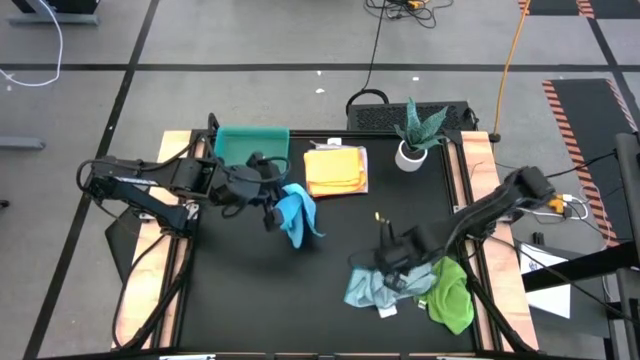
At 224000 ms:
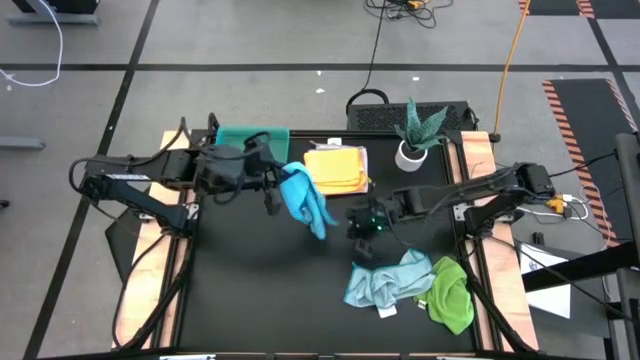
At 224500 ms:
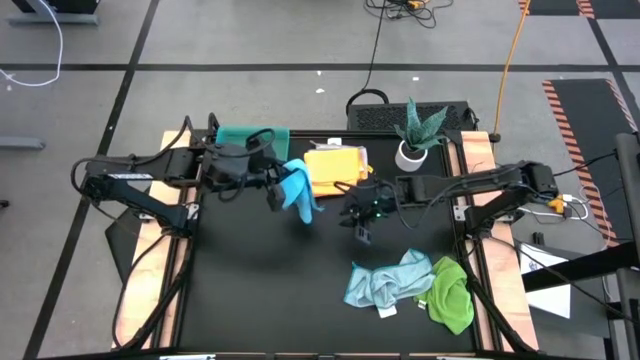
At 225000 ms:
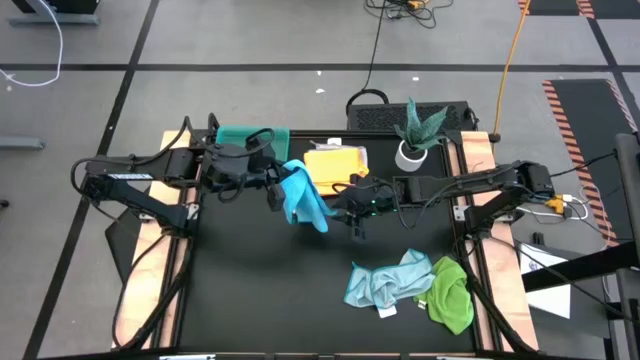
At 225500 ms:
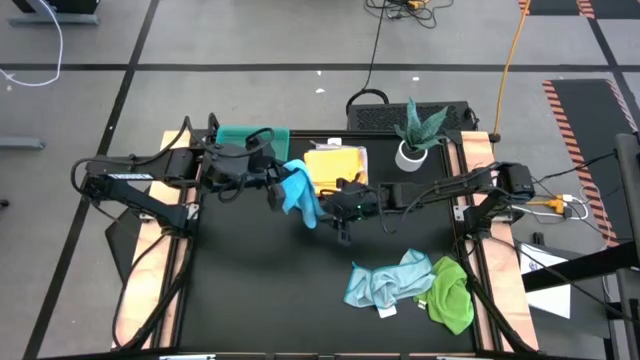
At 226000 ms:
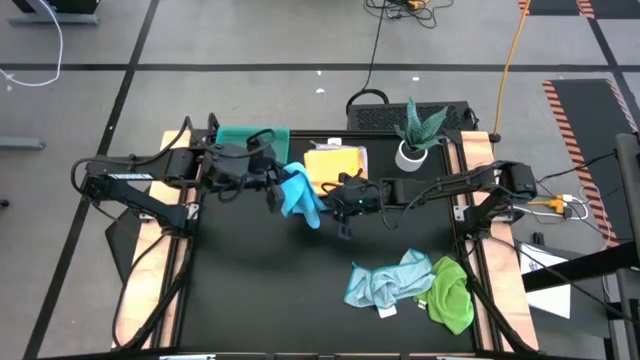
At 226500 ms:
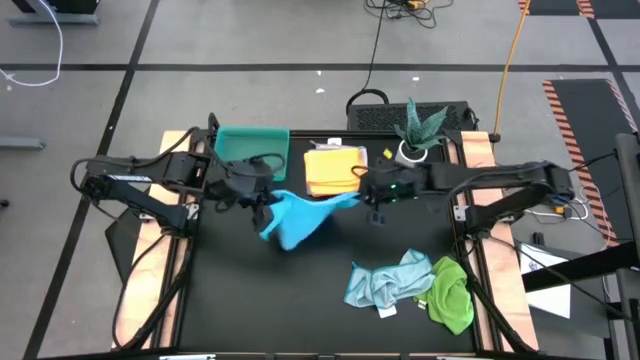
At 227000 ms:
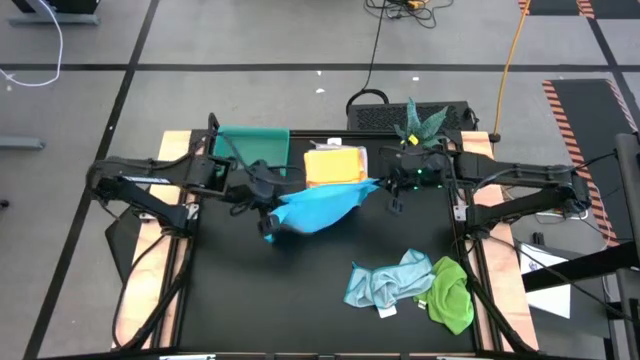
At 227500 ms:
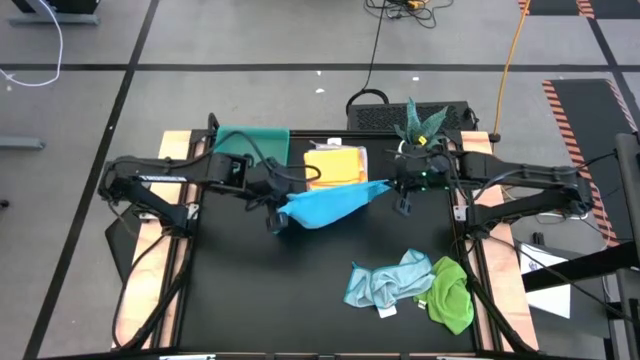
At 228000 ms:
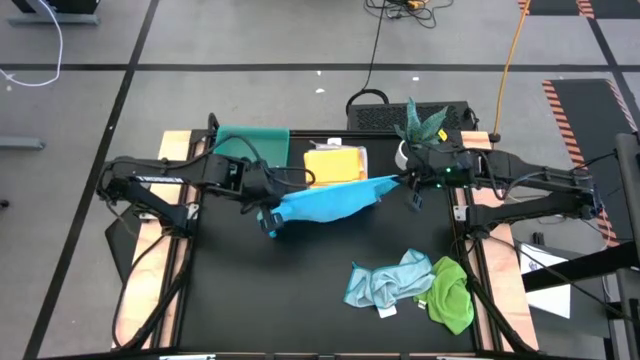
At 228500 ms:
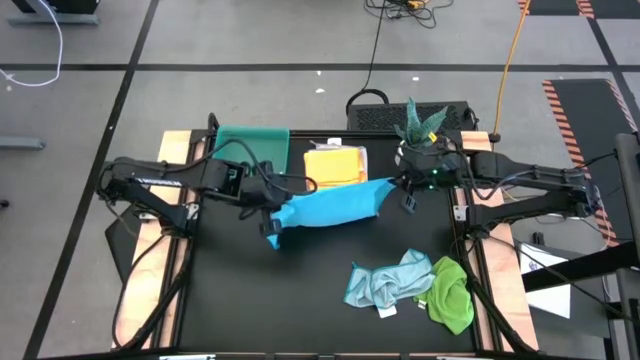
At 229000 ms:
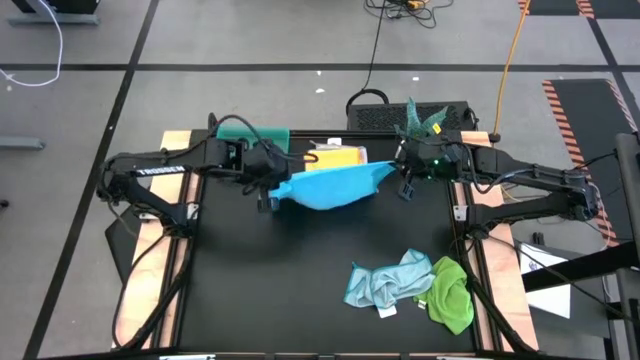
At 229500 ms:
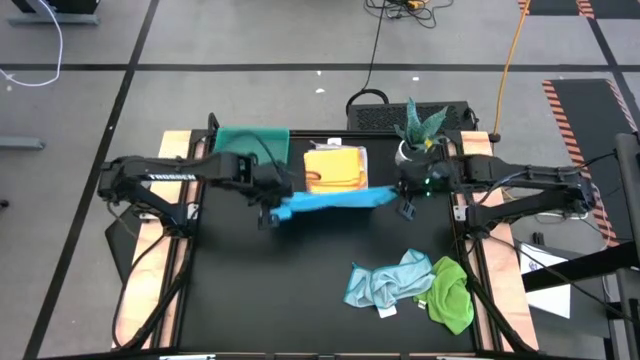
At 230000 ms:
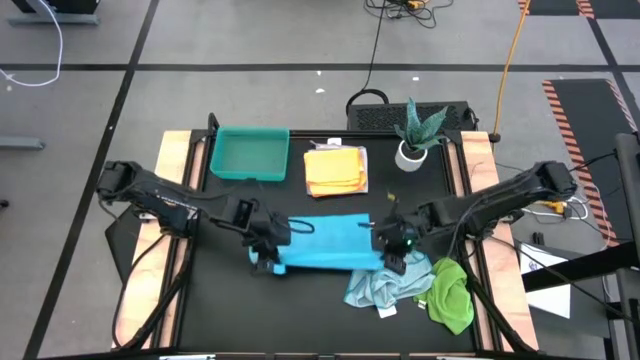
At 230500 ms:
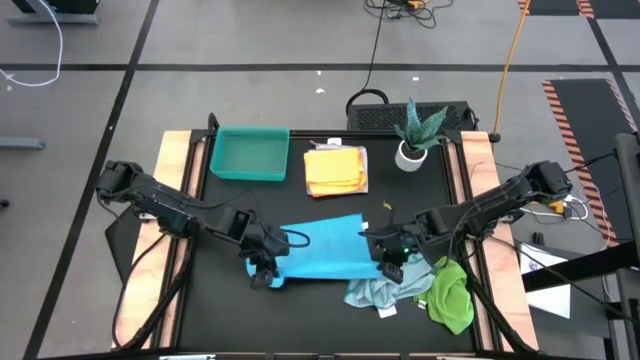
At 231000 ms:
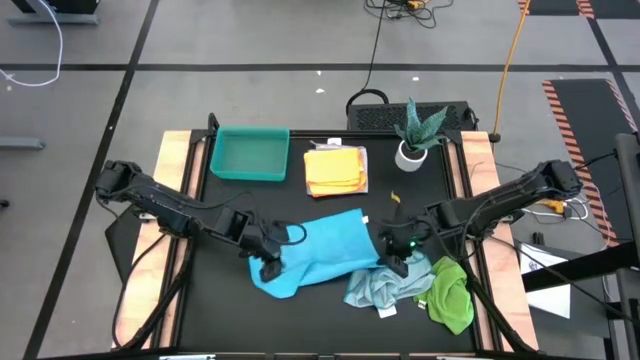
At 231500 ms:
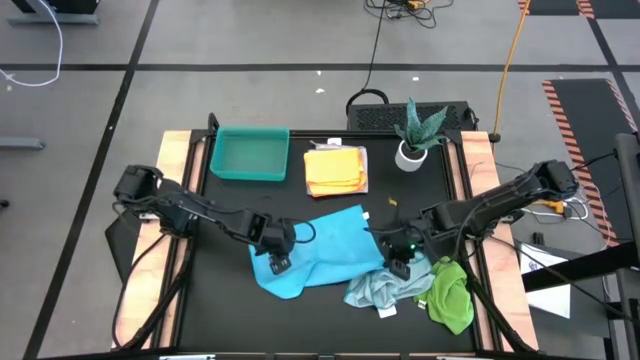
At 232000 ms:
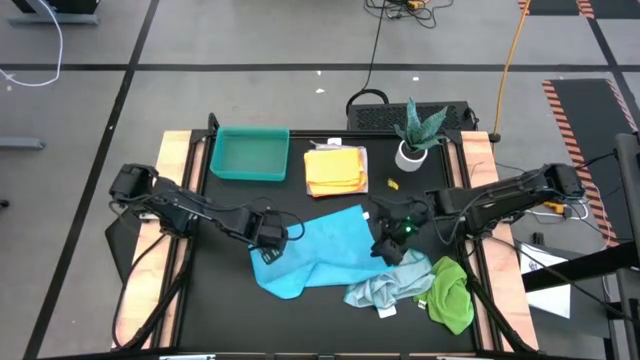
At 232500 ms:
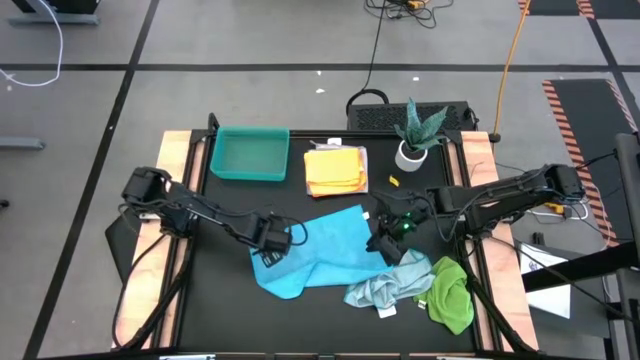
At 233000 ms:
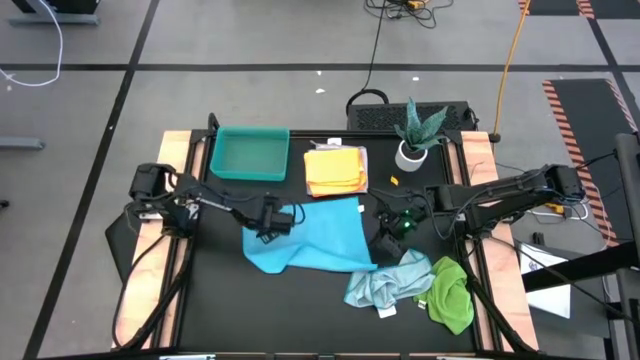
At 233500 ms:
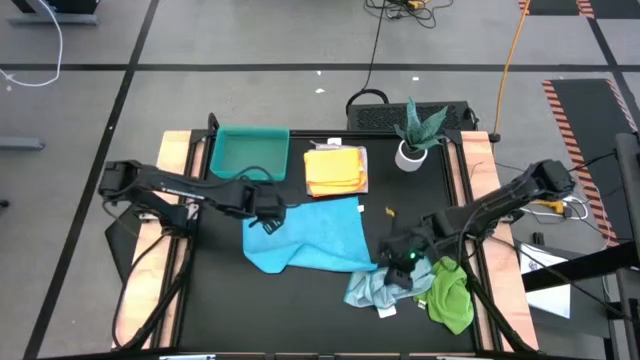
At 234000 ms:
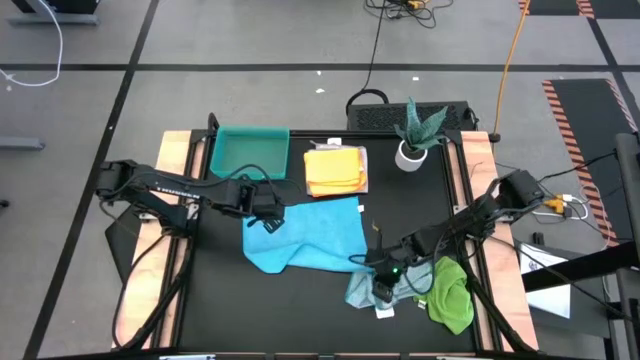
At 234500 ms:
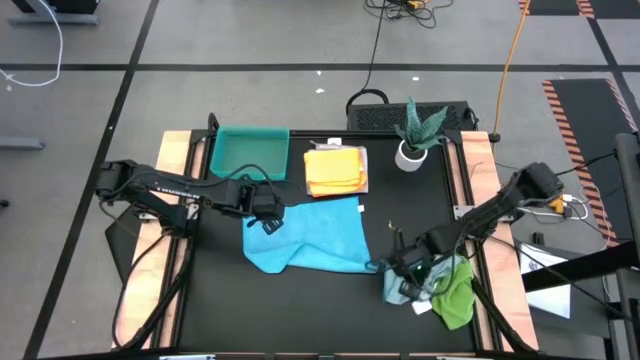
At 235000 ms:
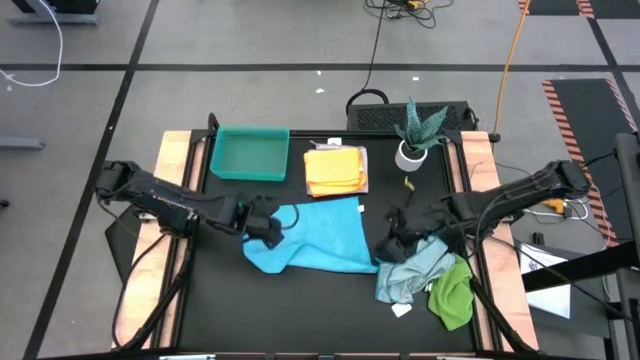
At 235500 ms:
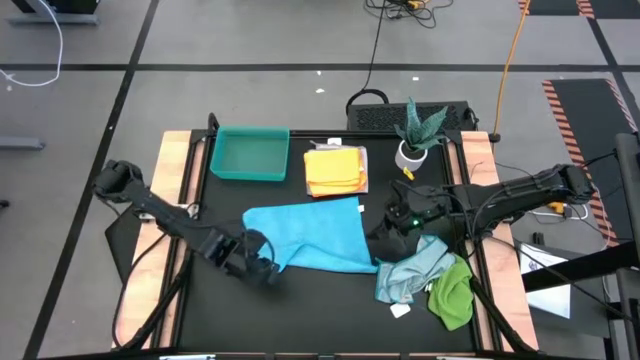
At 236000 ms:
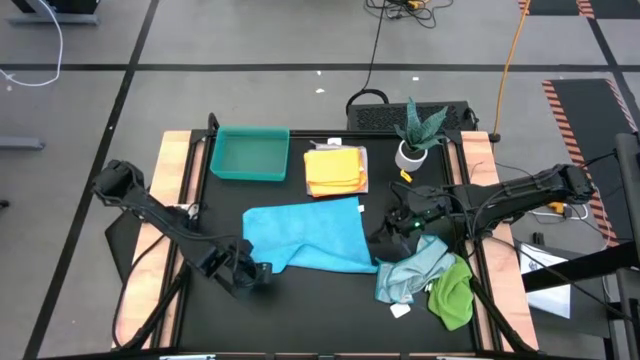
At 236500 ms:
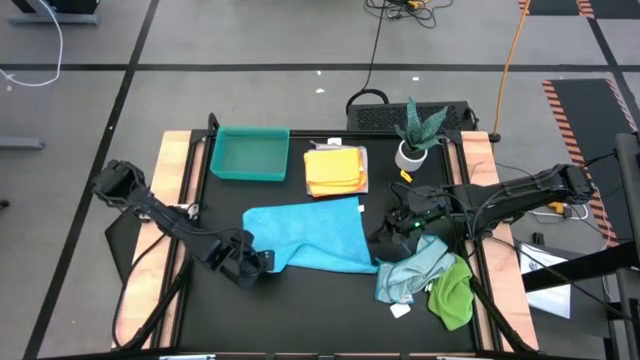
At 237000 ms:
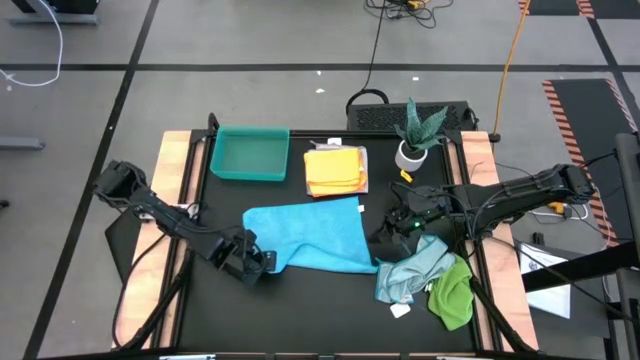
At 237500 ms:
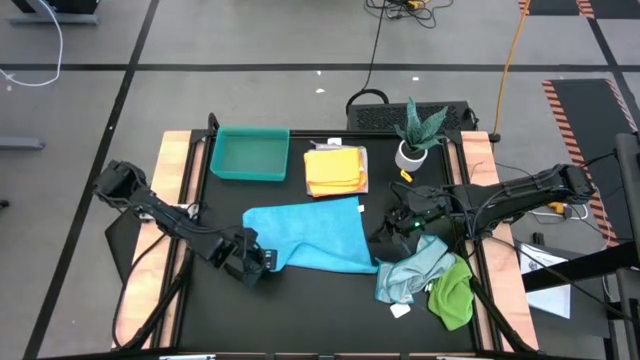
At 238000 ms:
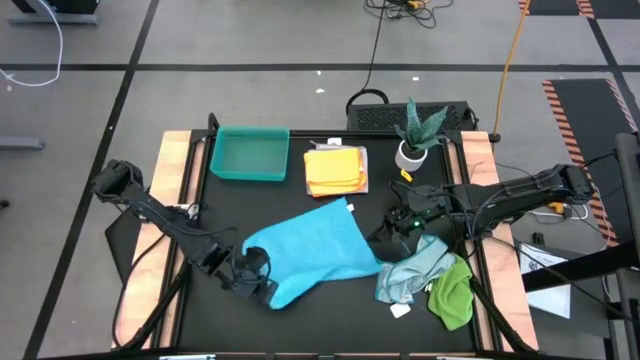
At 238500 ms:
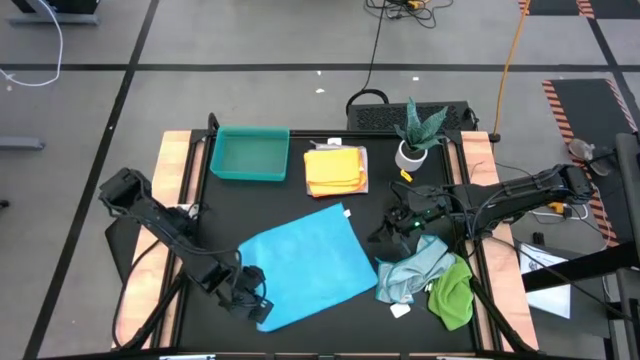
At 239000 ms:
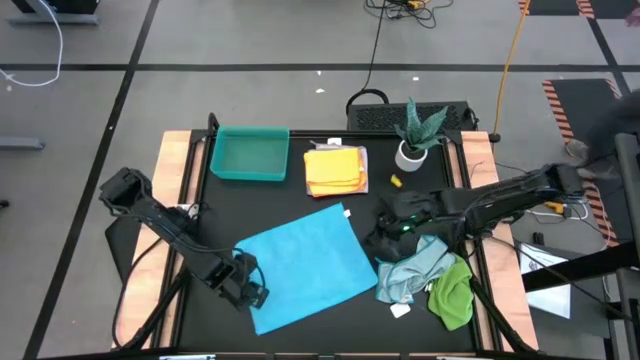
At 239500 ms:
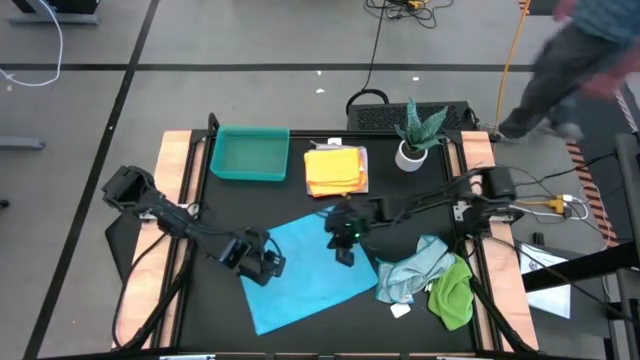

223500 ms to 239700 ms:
Task: Fold microfiber towels
Fold the blue microfiber towel

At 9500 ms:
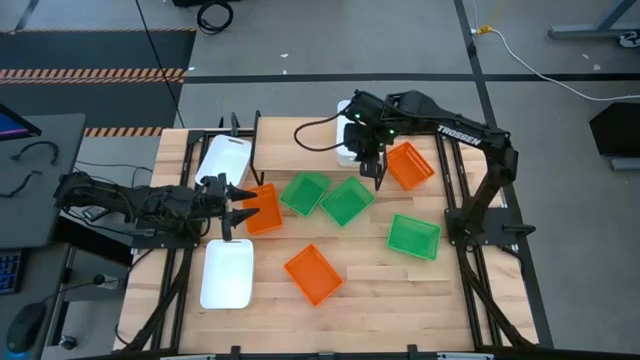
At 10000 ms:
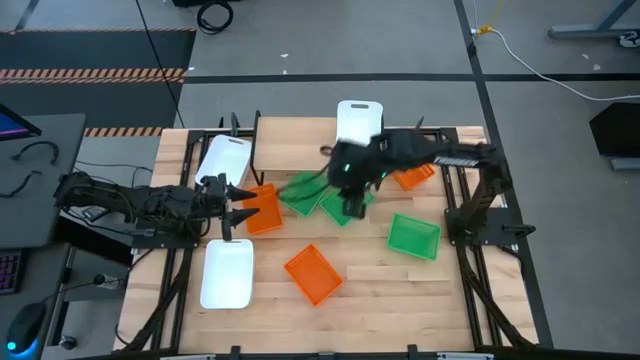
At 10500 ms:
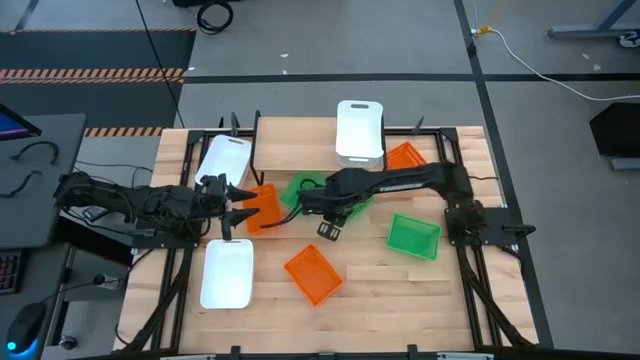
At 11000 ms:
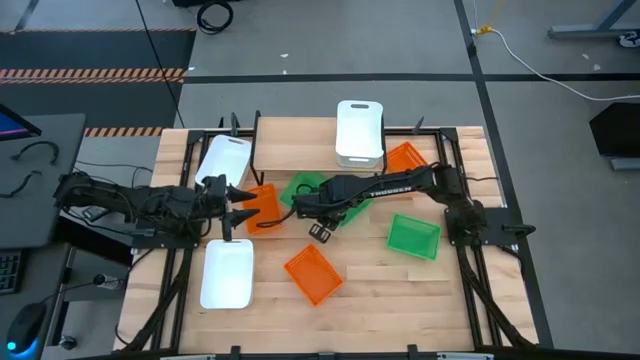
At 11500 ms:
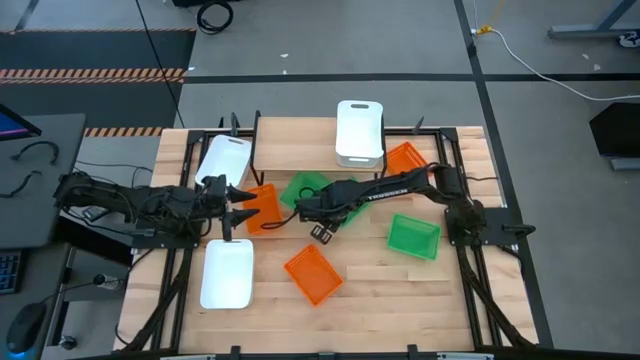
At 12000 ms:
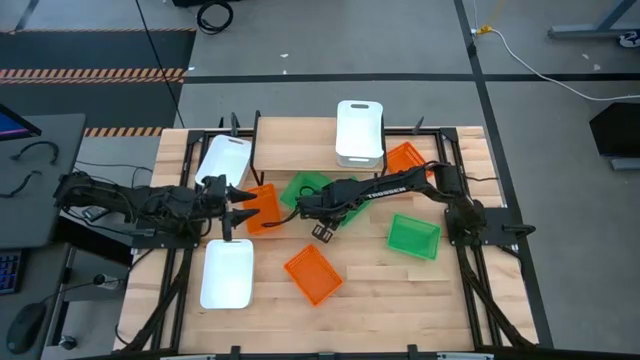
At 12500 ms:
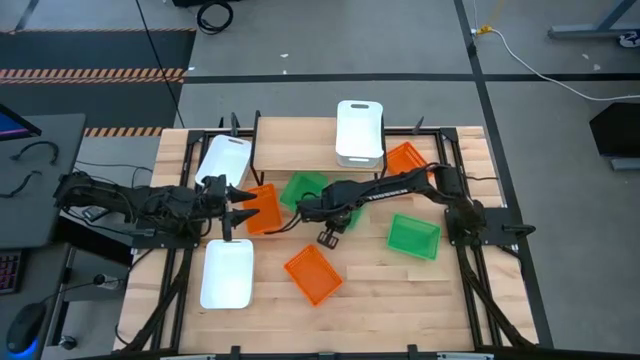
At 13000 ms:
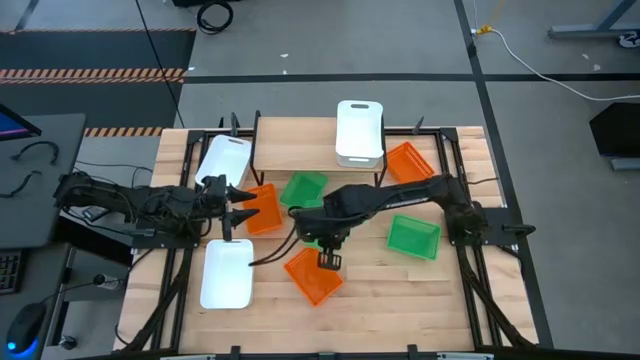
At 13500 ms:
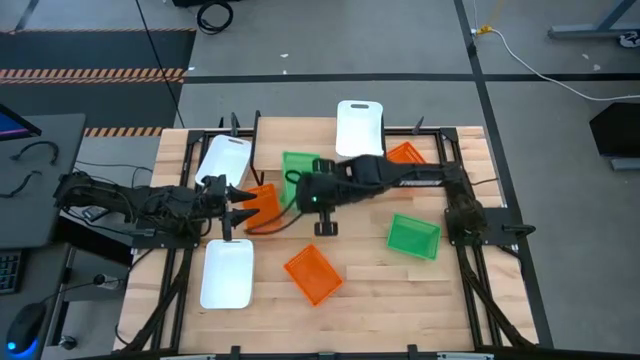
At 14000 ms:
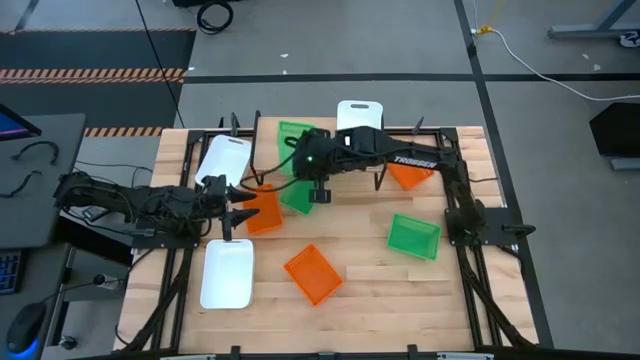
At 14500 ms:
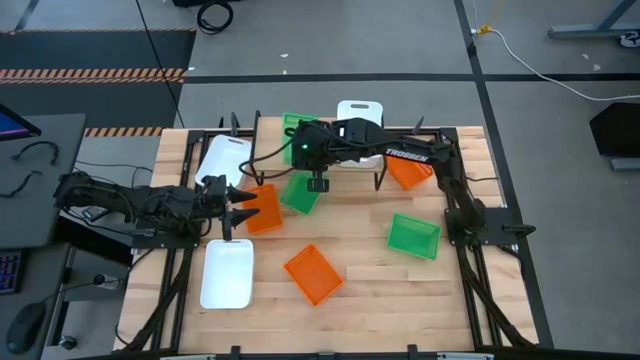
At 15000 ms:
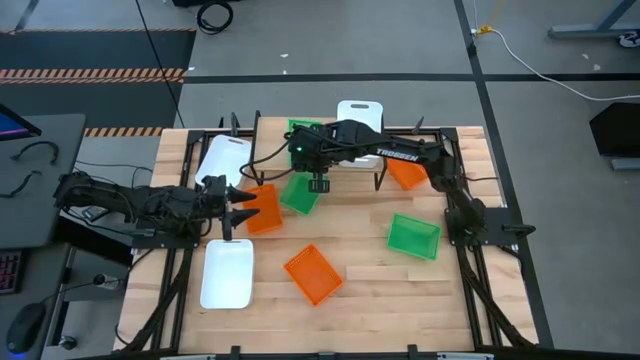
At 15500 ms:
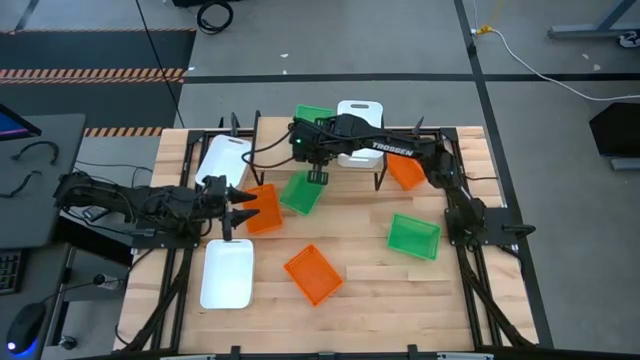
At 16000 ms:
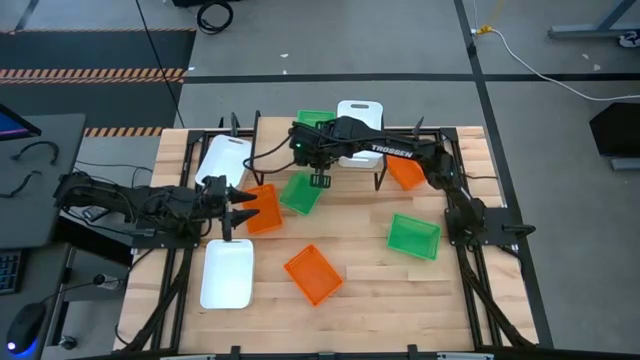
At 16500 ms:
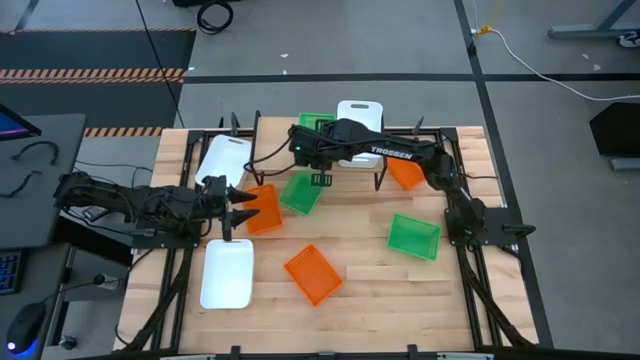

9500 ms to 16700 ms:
Task: Stack baskets on shelf by color
Put the middle green bin on the shelf
